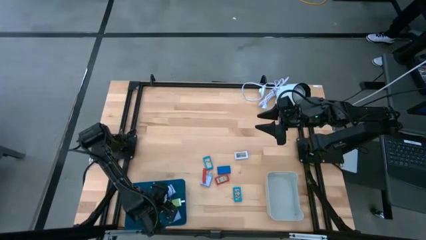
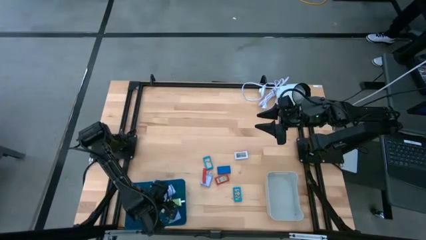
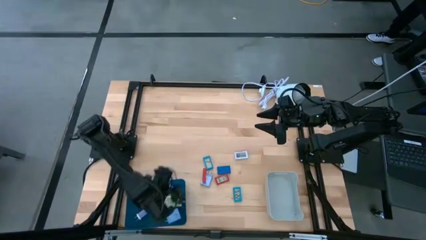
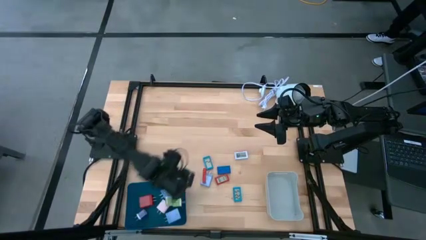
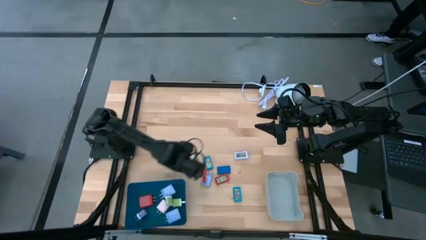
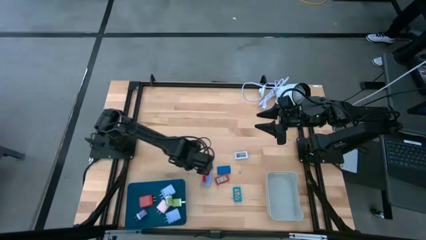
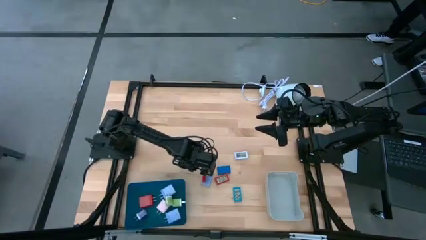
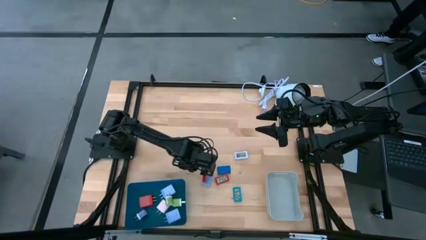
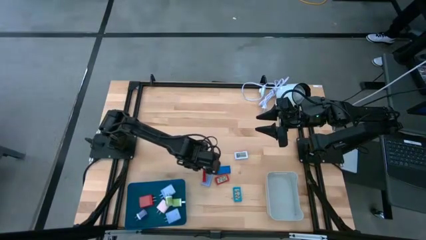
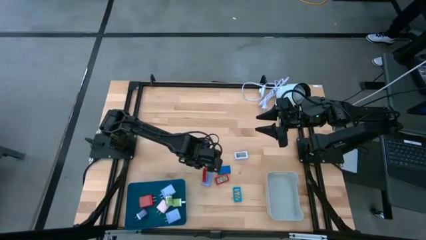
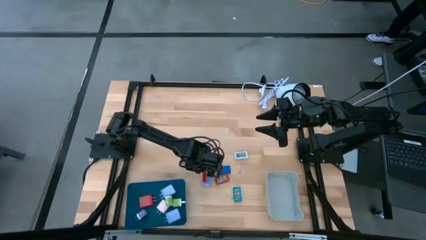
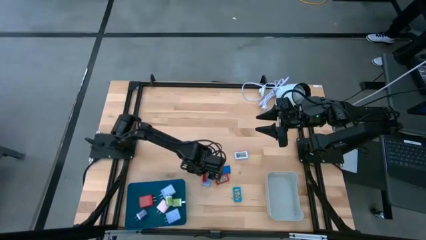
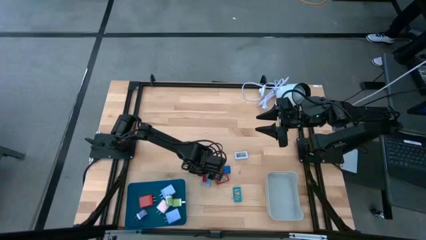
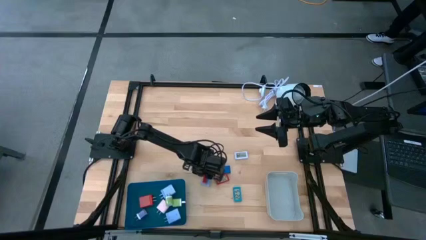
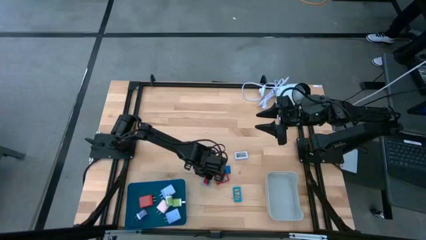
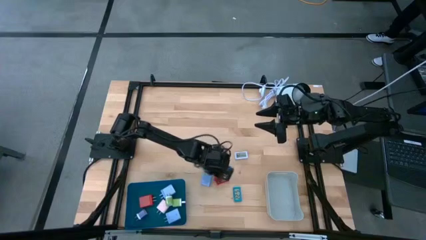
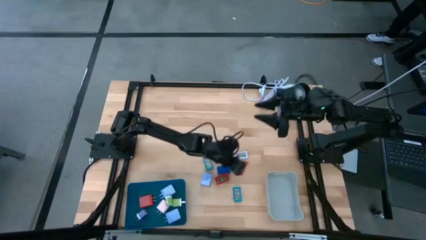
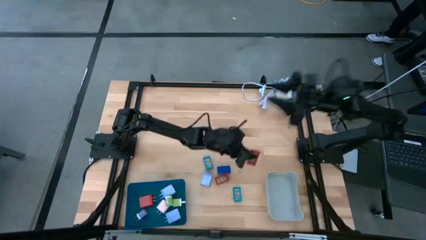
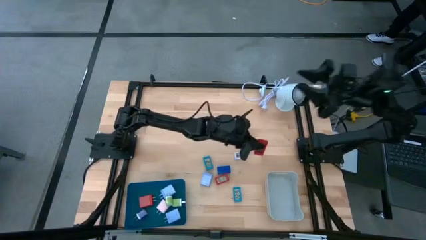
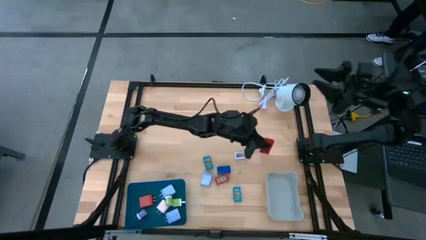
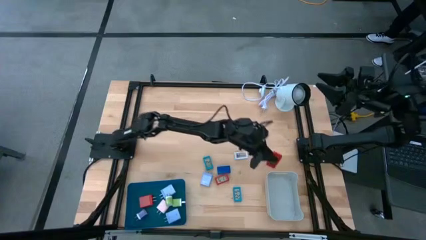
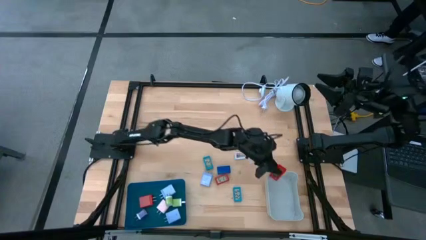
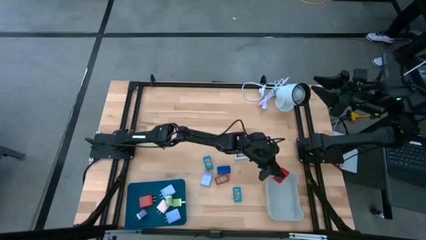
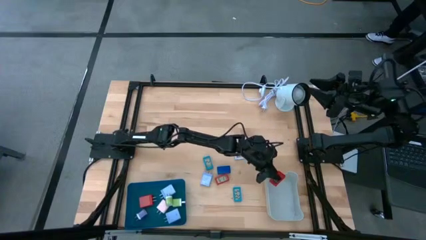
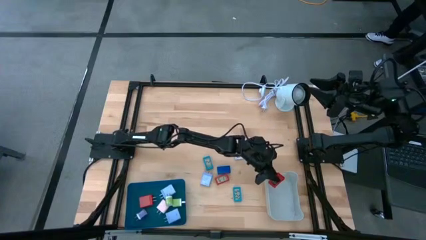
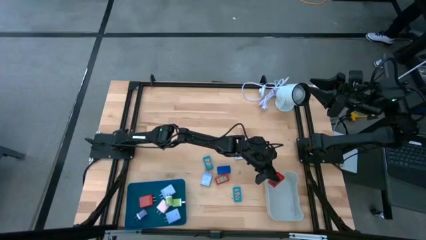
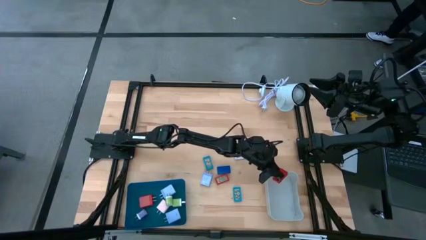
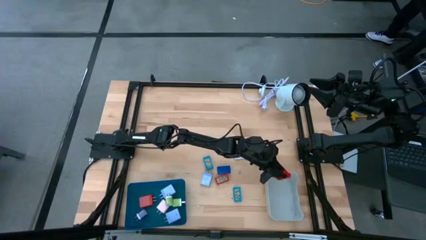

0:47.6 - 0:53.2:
Task: Pick & Place Office items
Put the left red digital clock into the gray bin

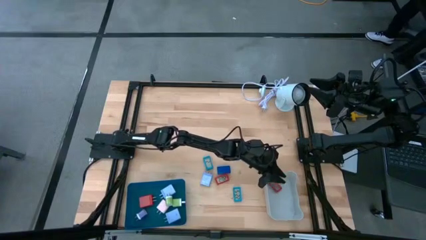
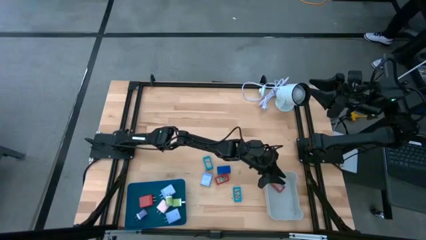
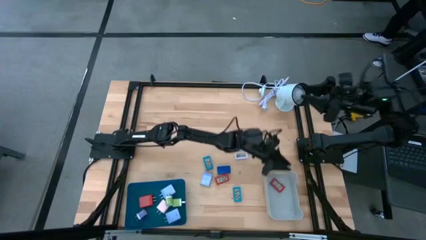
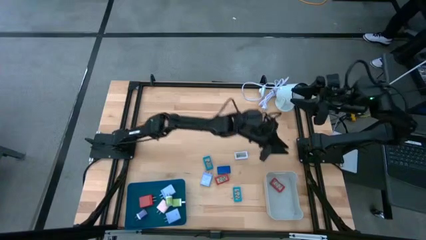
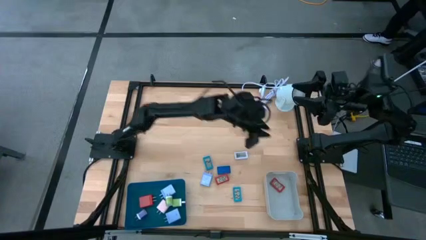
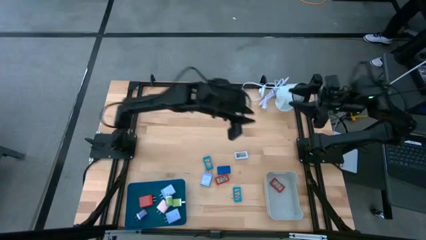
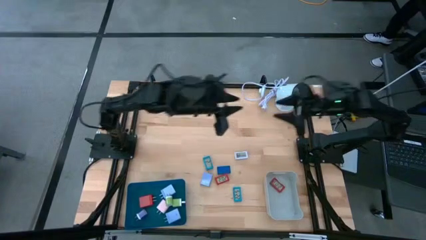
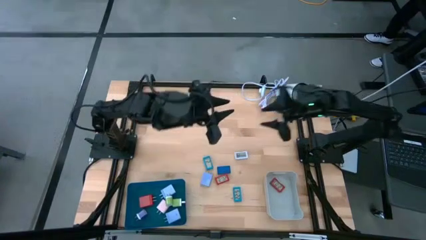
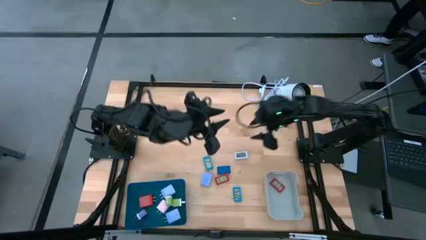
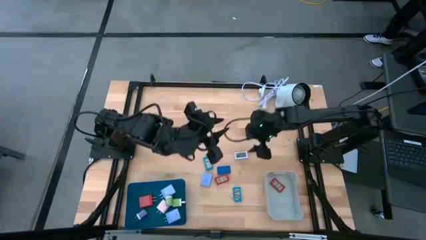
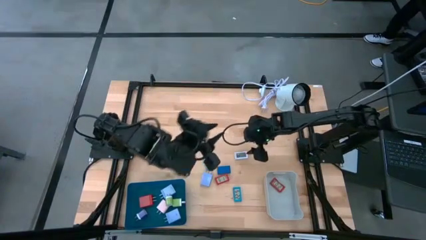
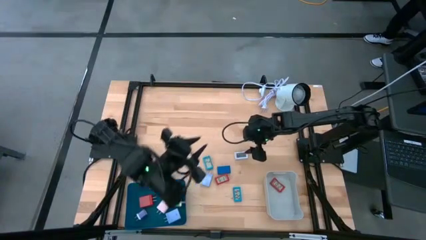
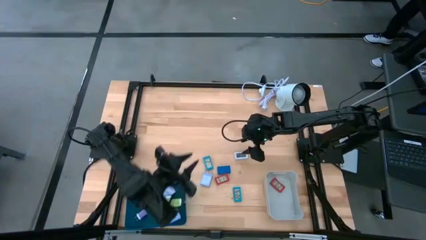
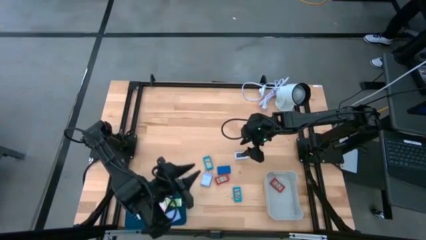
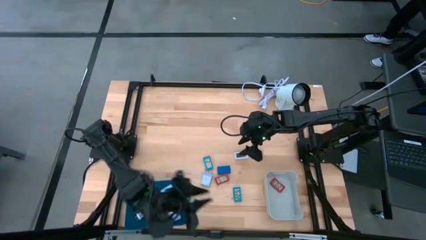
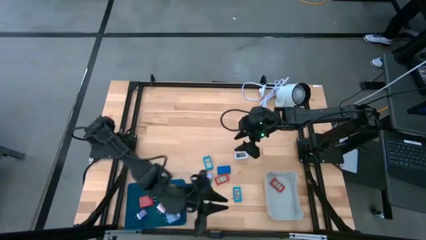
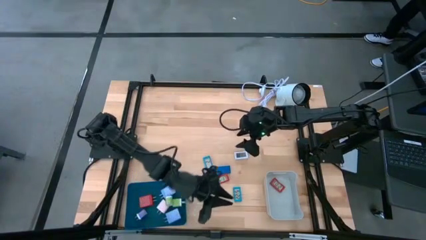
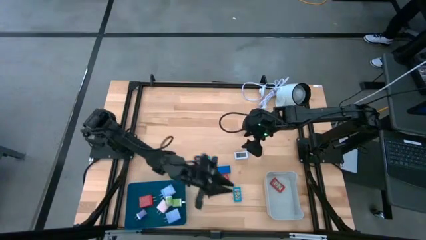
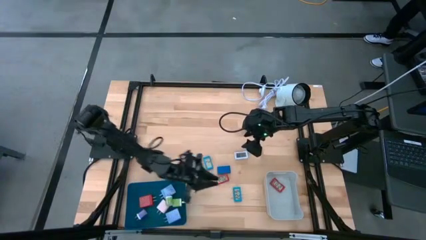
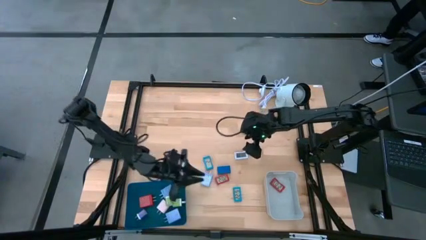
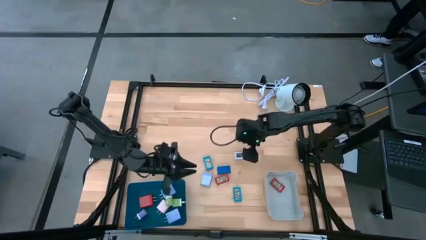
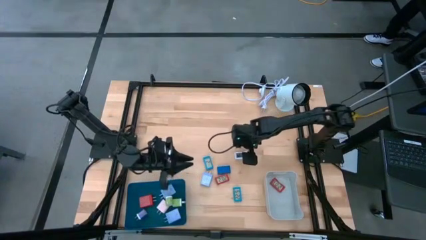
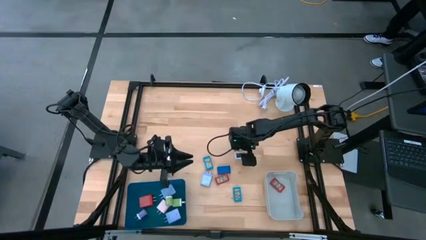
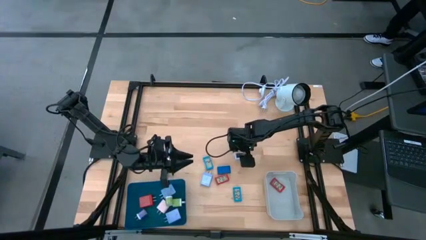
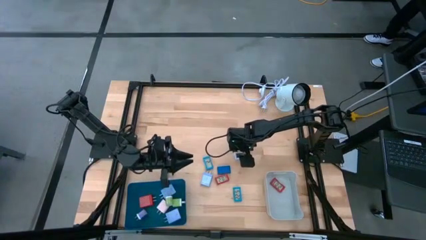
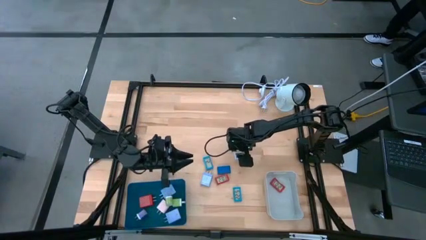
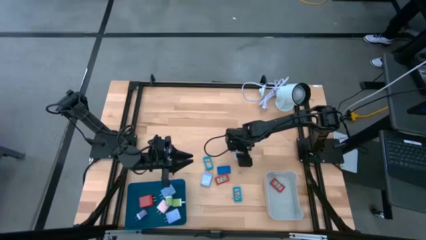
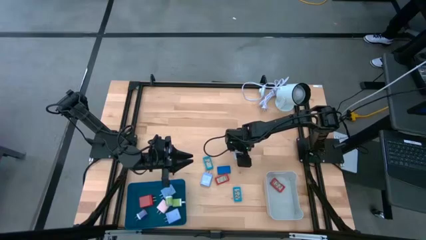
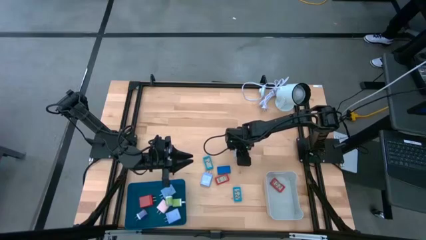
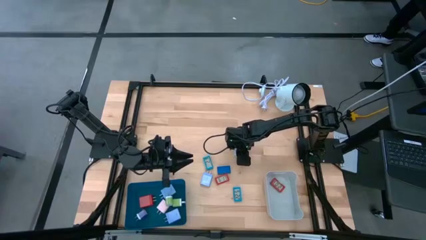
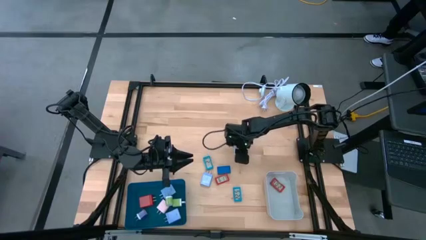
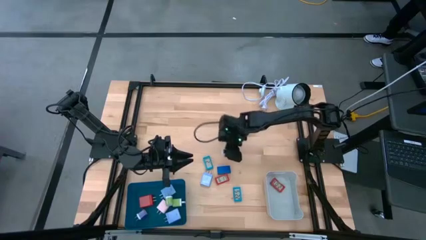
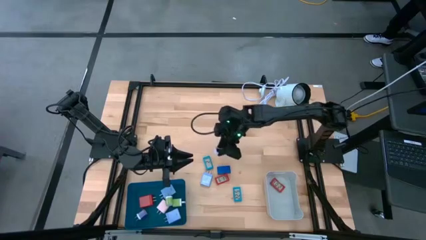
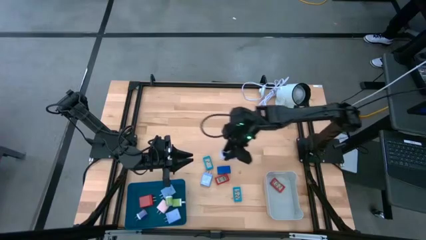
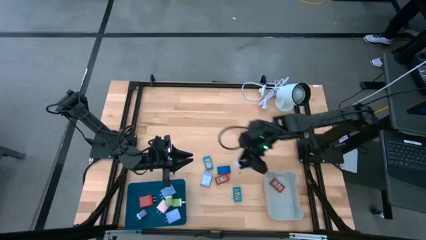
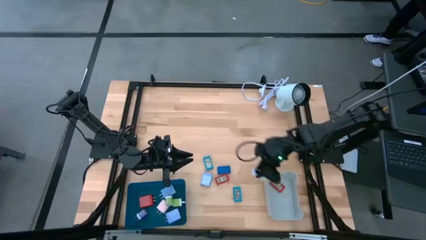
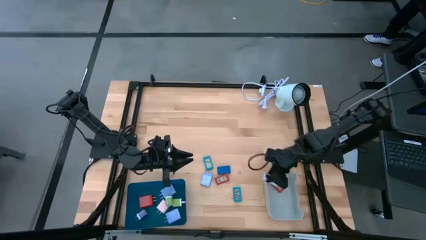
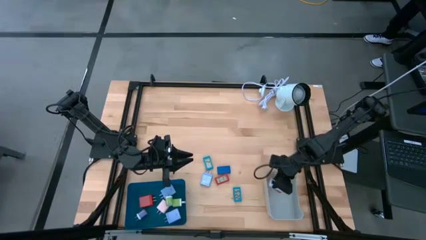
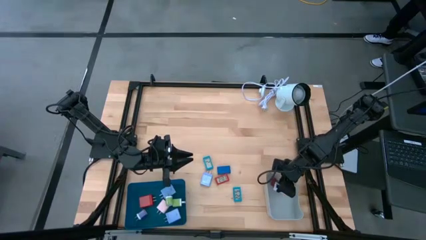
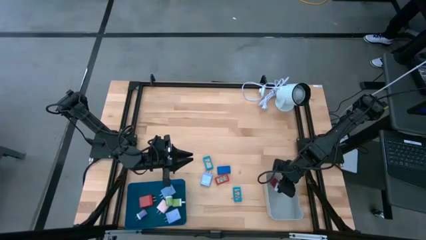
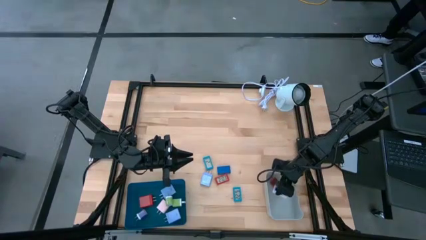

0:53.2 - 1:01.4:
Put the white digital clock into the gray bin

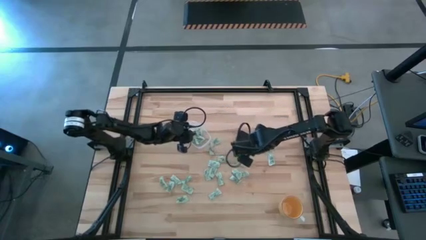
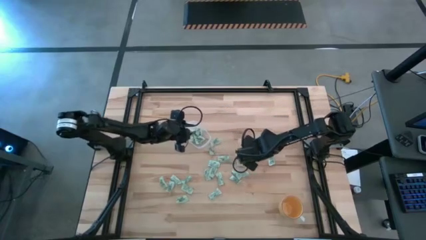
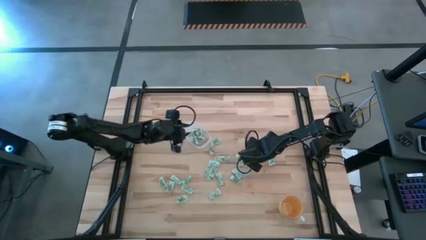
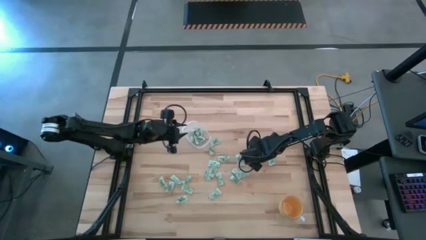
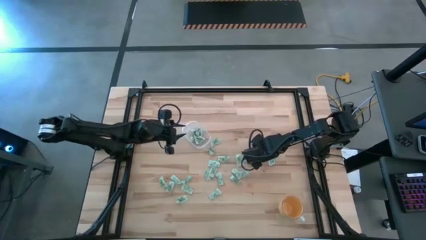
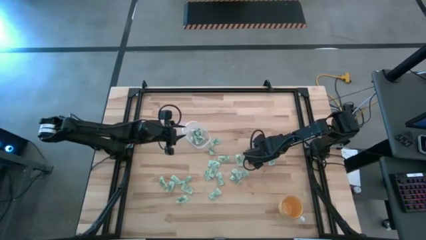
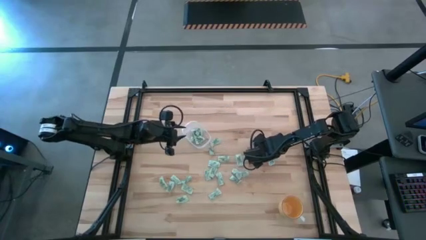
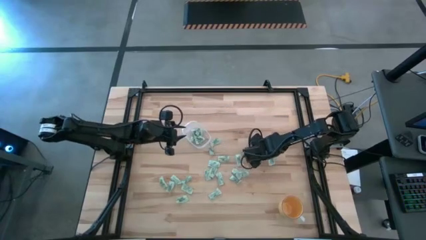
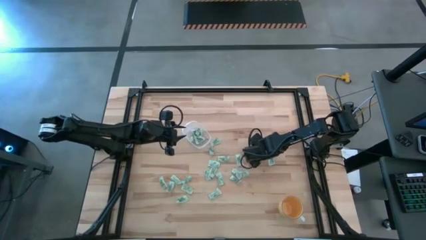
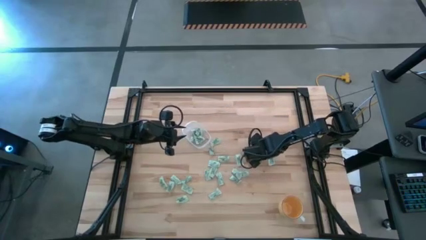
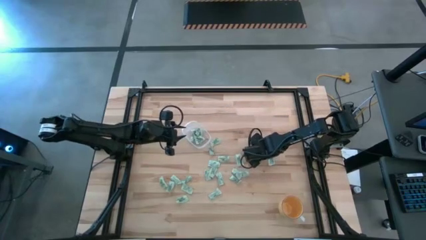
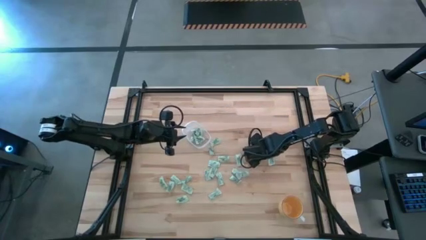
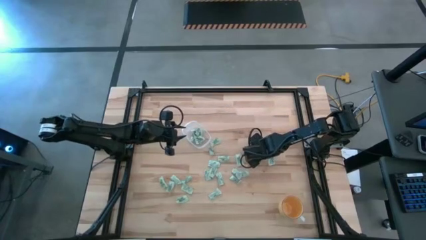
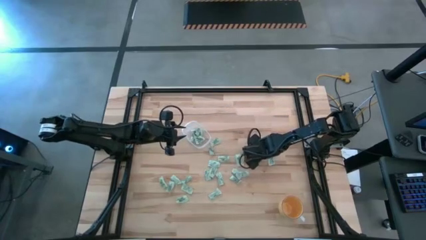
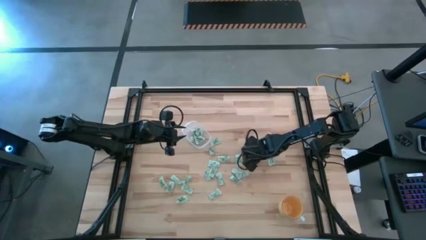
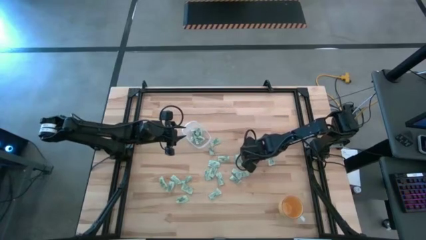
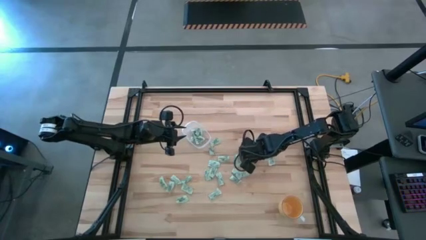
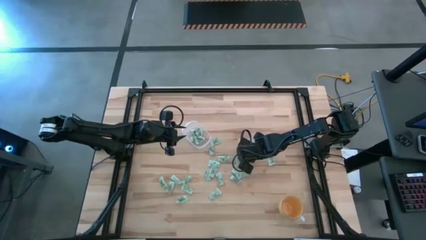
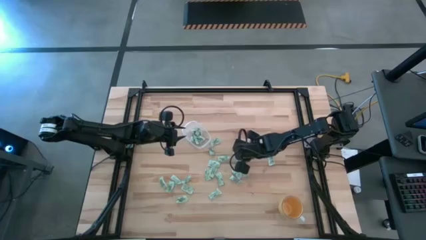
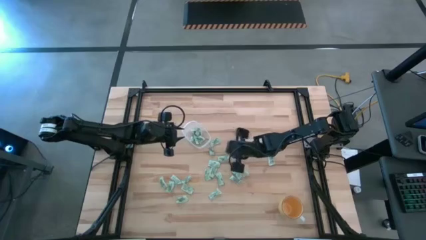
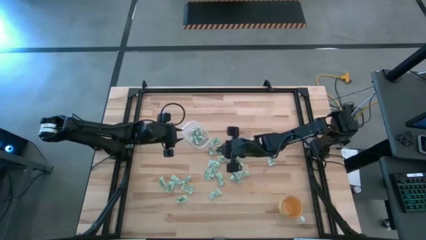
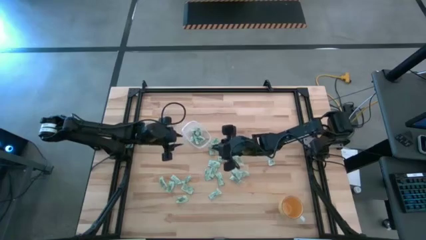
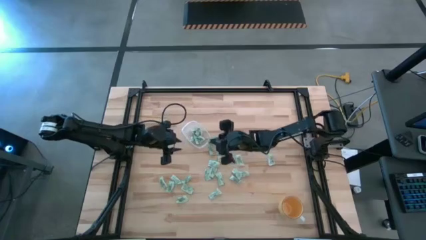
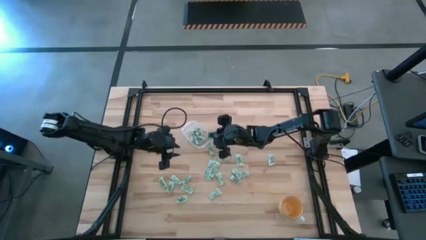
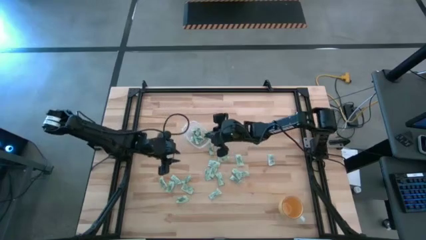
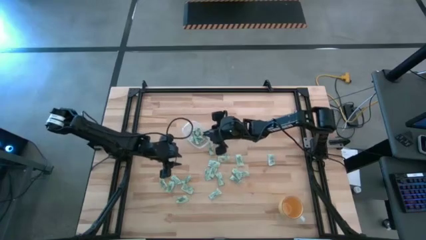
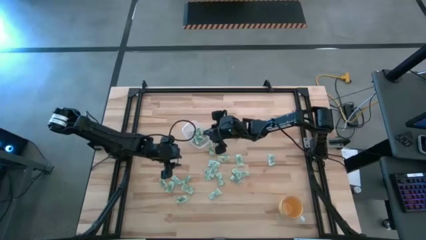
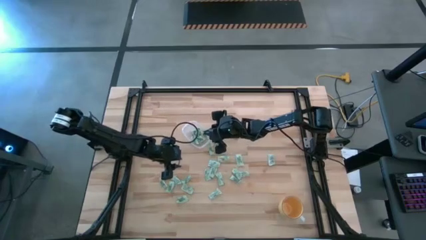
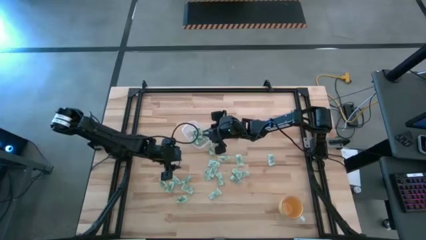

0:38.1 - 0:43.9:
Task: Pick and place Stevia / Truvia into bins
Put the stevia packet into the transparent bin
